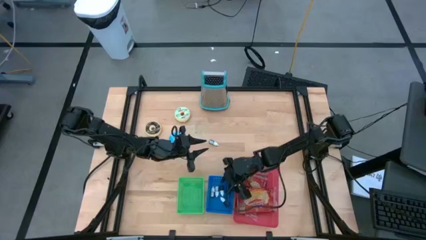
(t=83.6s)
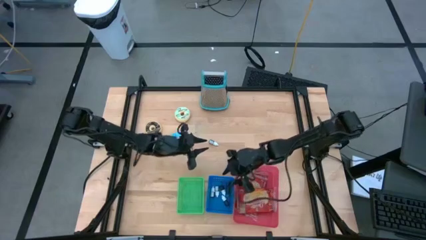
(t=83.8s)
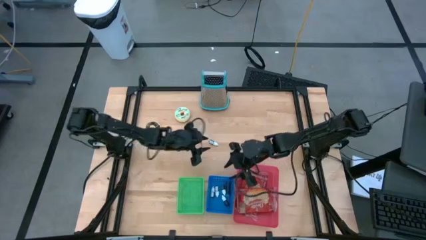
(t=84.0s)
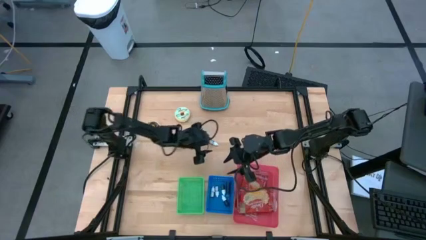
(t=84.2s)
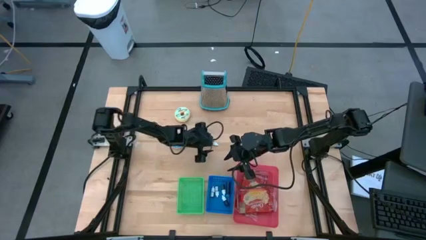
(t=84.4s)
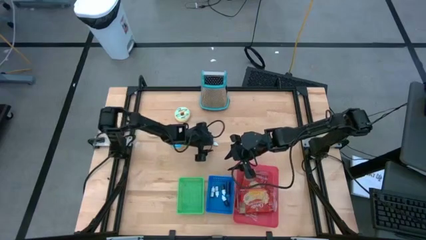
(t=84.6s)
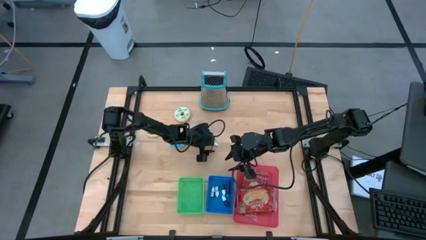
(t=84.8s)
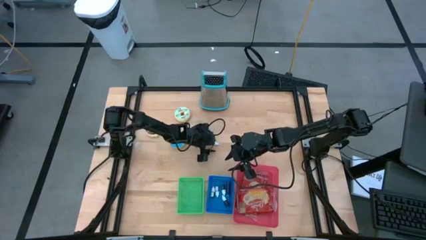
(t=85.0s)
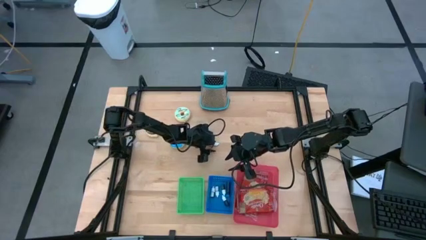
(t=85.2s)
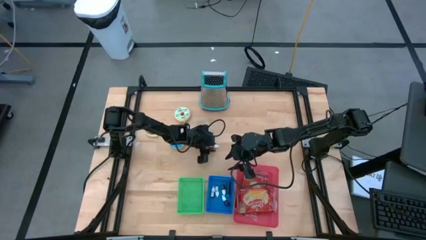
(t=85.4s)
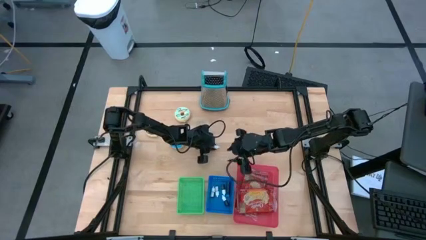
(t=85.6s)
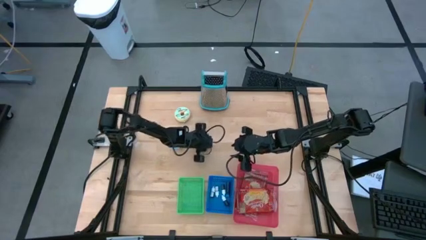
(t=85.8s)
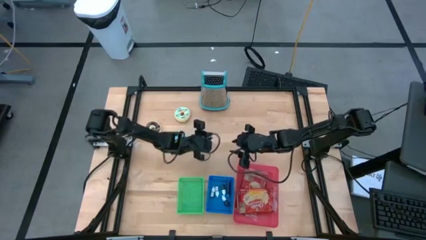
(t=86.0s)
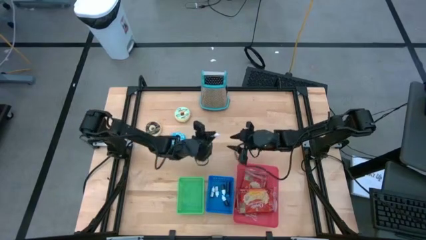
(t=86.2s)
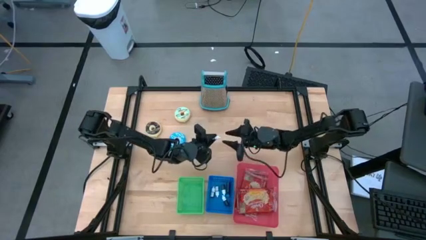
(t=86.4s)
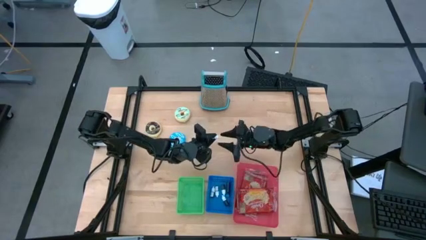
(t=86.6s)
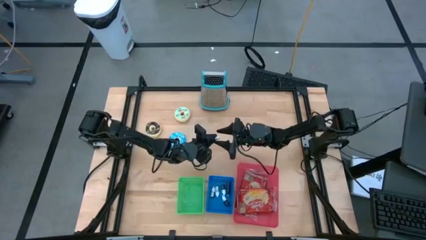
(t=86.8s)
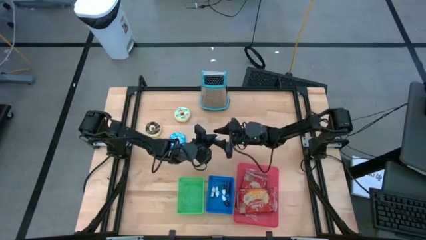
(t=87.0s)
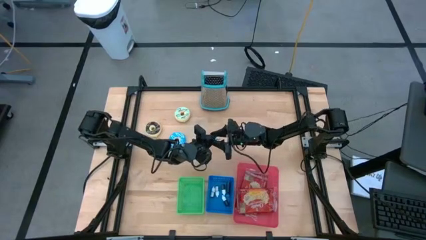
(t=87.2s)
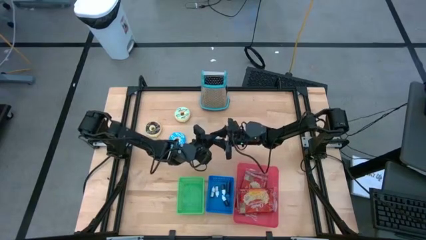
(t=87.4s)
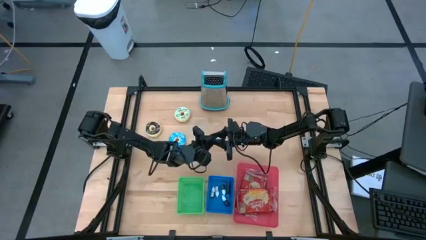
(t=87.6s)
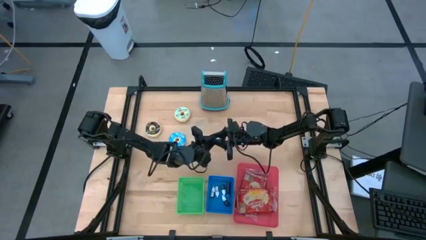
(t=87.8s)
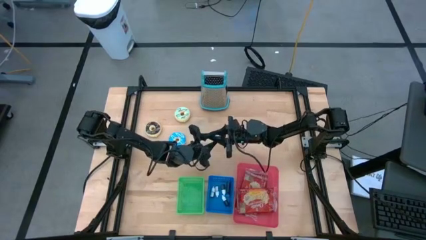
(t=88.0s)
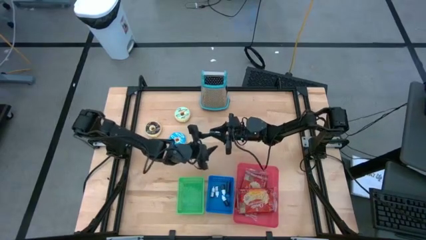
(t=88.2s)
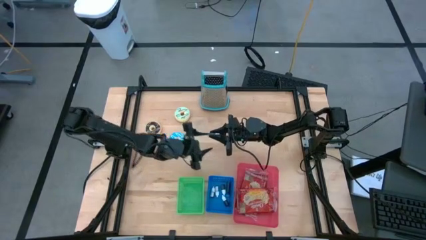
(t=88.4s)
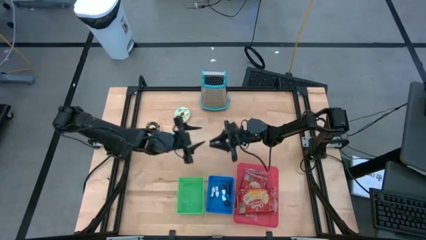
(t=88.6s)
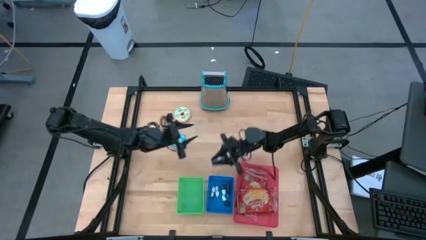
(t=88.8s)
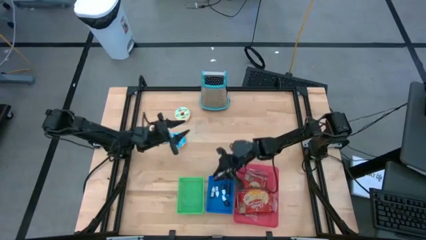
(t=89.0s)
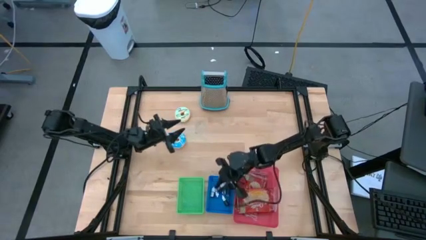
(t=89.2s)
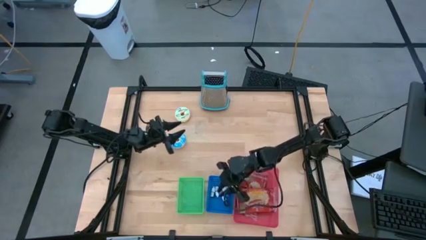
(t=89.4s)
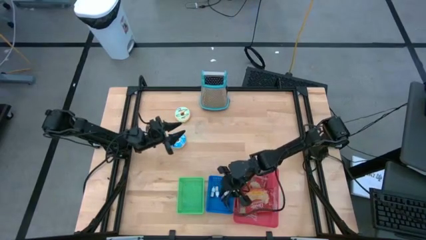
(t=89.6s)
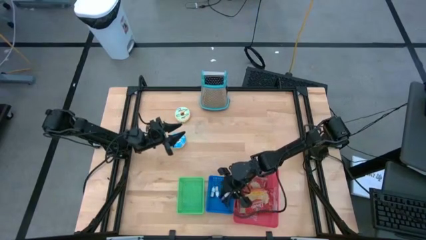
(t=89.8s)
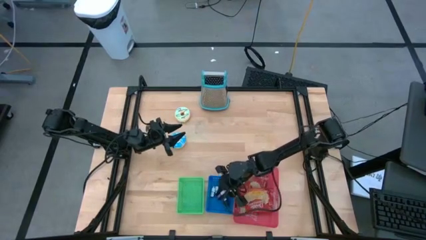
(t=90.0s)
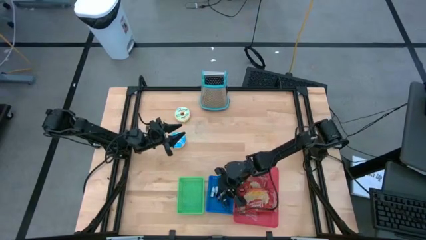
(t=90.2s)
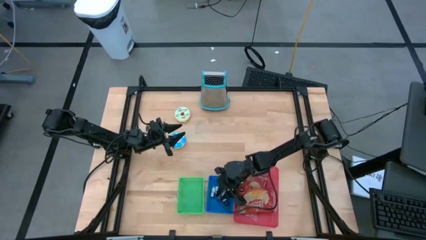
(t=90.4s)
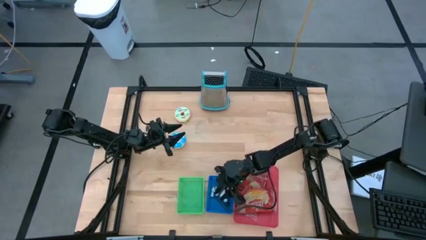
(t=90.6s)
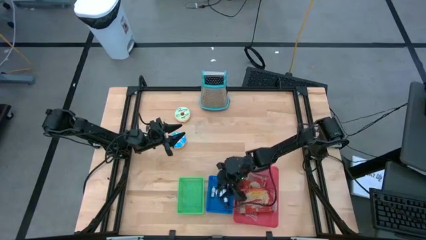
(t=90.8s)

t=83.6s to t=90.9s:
Put the purple food coloring bottle into the blue bin

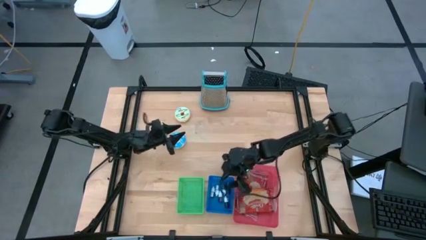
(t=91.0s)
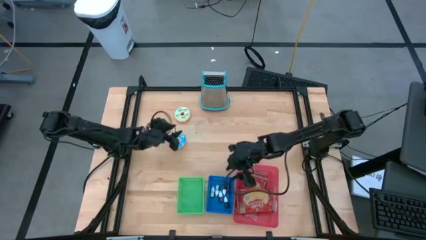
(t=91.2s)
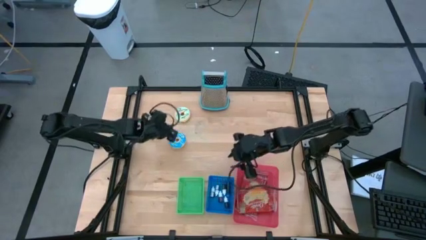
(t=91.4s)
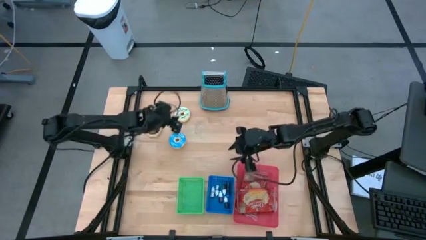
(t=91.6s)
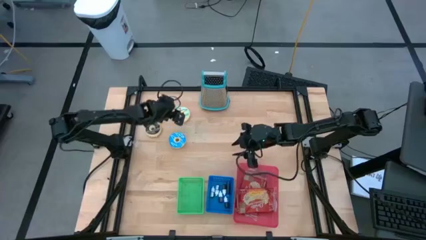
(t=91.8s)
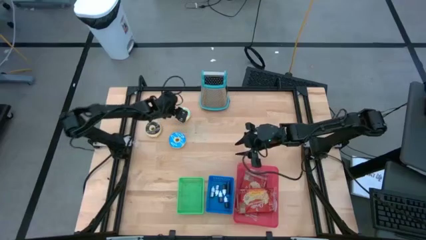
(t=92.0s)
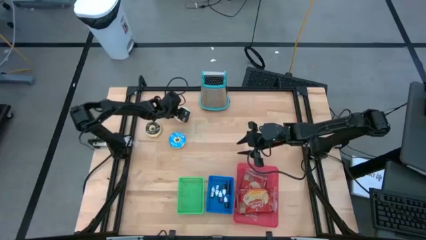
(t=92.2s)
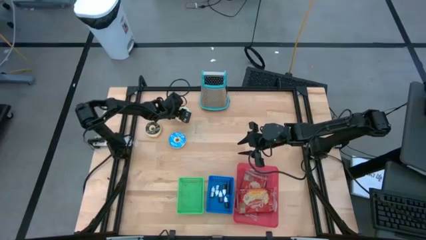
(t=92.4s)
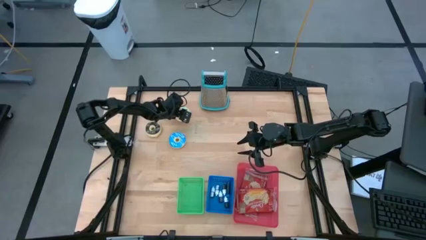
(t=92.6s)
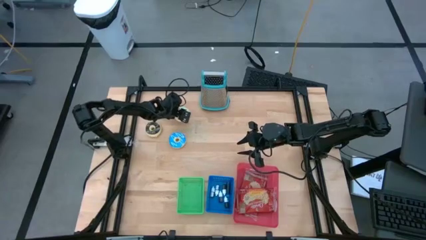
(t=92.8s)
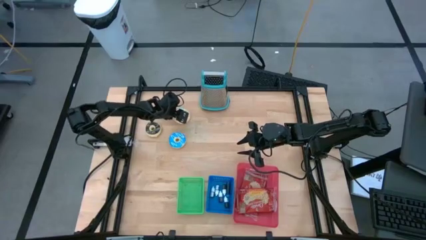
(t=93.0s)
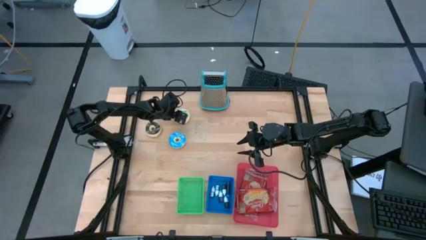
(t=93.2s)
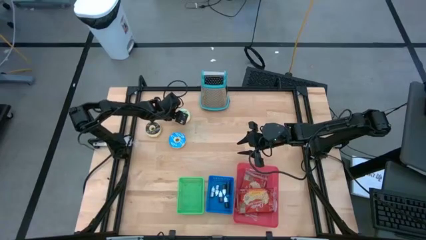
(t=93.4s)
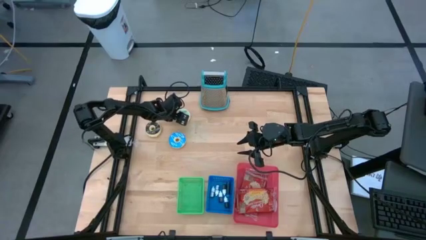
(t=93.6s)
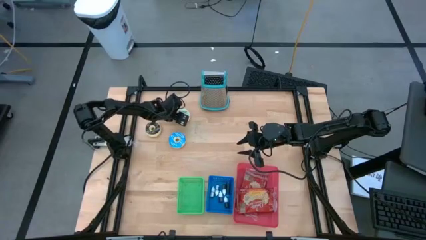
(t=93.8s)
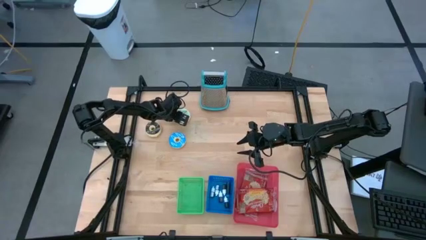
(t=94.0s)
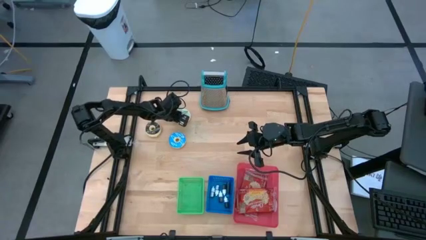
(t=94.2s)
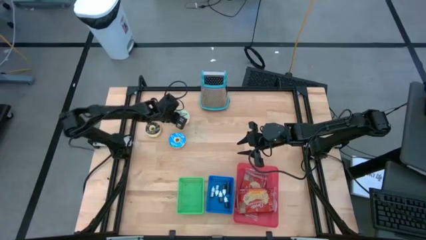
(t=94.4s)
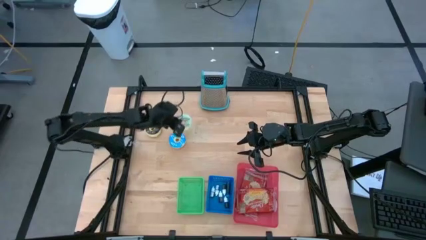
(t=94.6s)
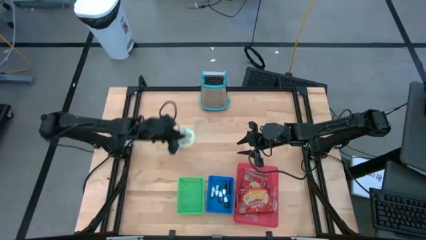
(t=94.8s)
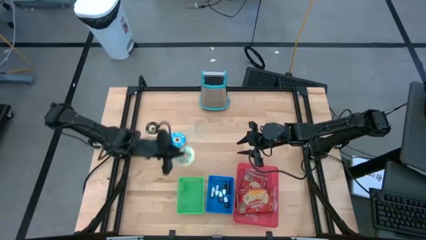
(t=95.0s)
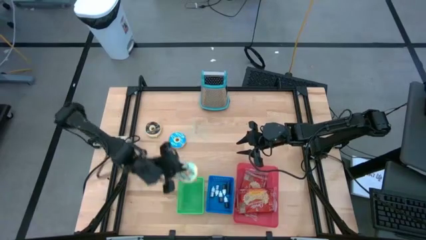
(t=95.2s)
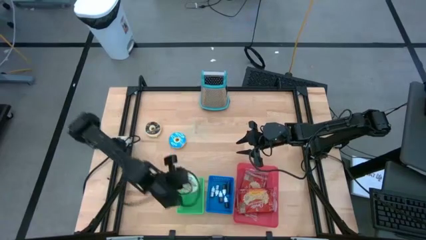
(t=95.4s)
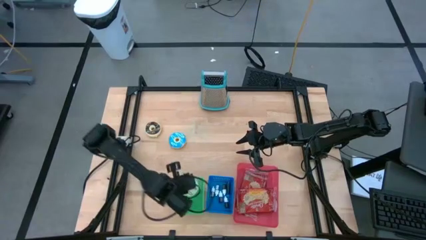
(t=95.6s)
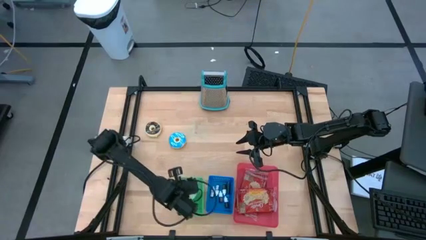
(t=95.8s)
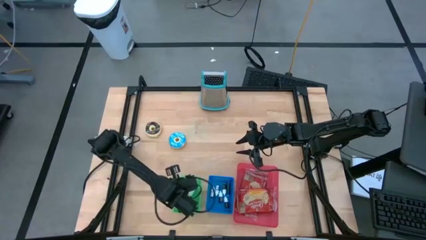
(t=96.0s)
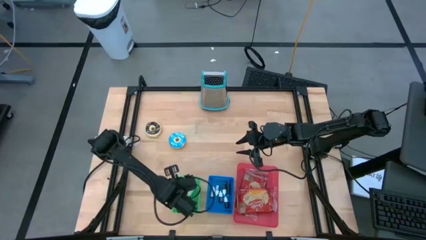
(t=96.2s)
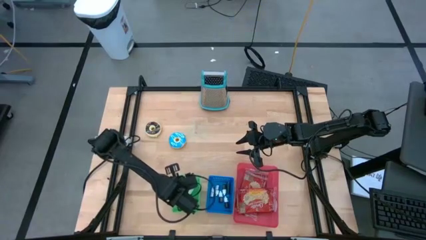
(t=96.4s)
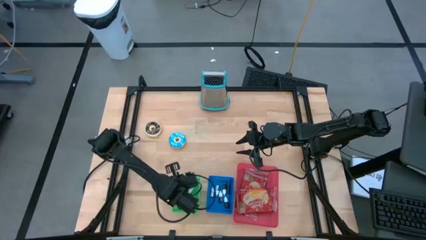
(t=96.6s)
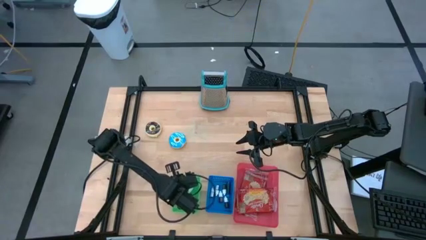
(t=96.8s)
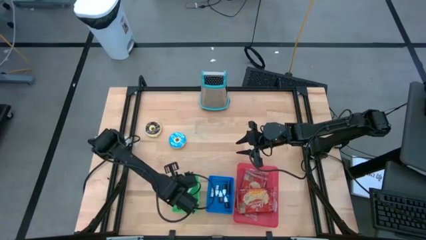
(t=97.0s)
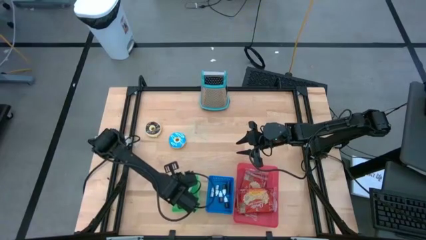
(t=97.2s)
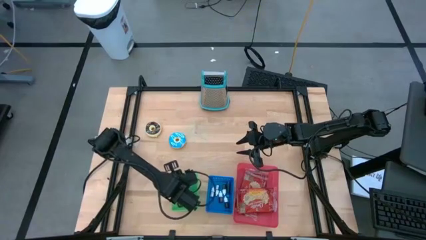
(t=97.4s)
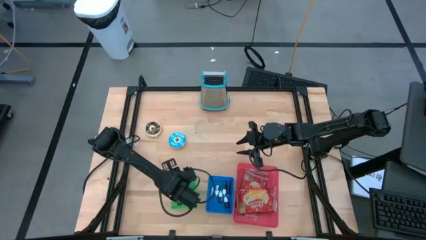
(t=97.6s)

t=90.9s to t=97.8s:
Put the light blue doughnut into the green bin
